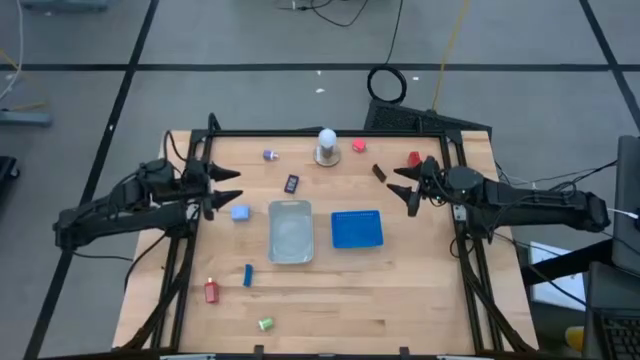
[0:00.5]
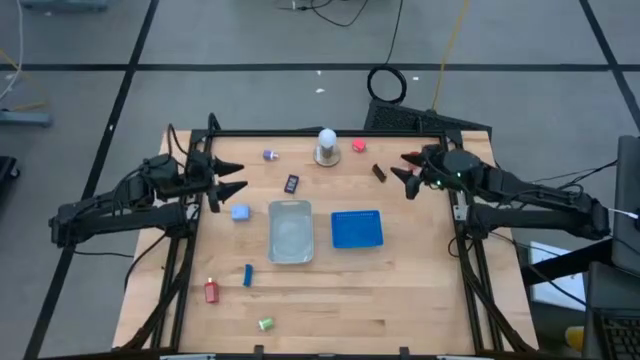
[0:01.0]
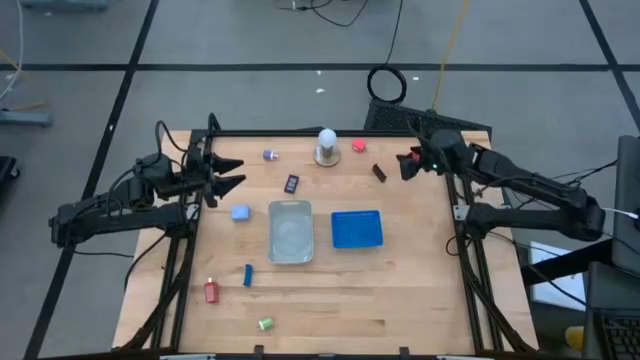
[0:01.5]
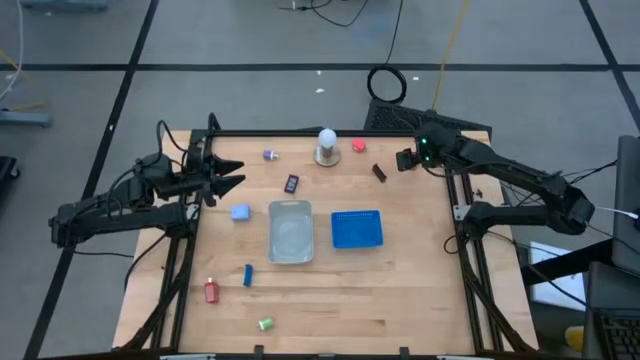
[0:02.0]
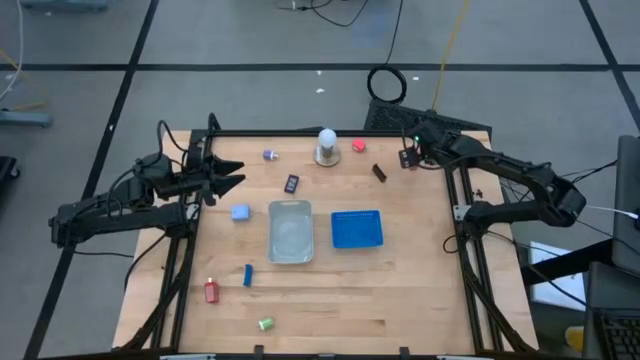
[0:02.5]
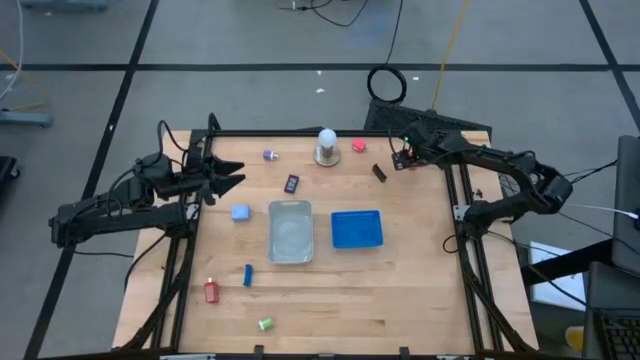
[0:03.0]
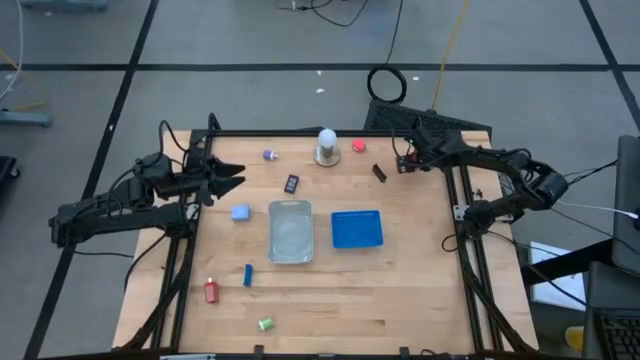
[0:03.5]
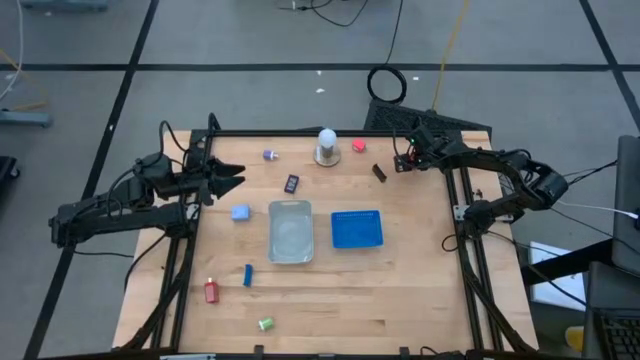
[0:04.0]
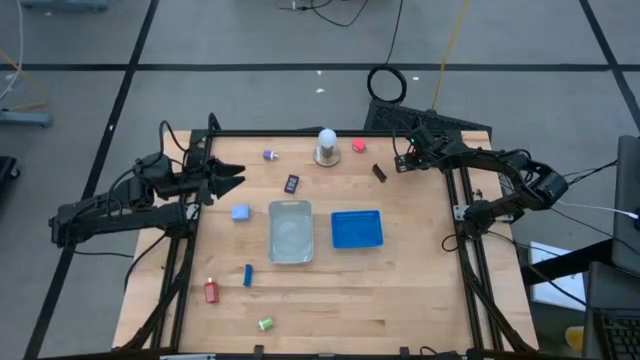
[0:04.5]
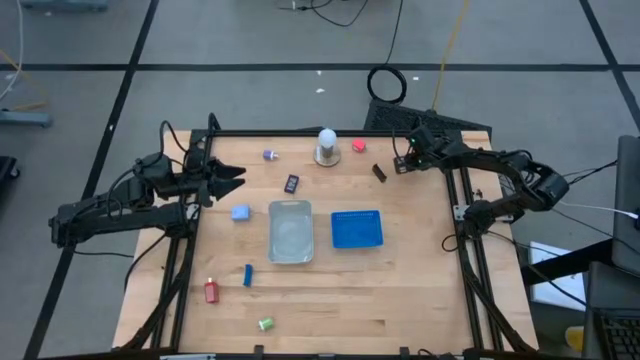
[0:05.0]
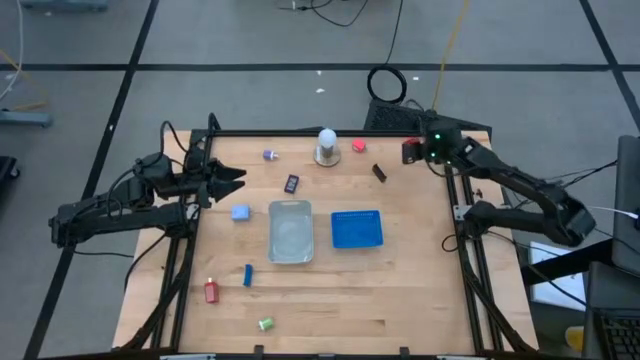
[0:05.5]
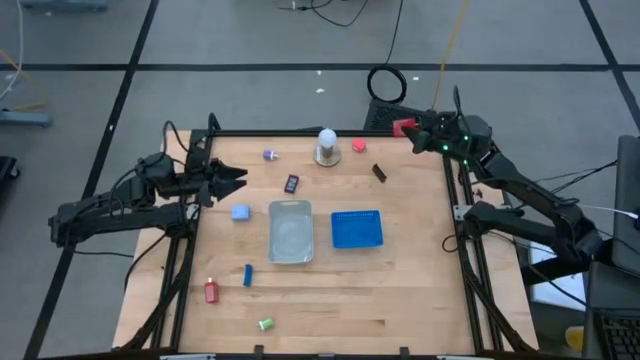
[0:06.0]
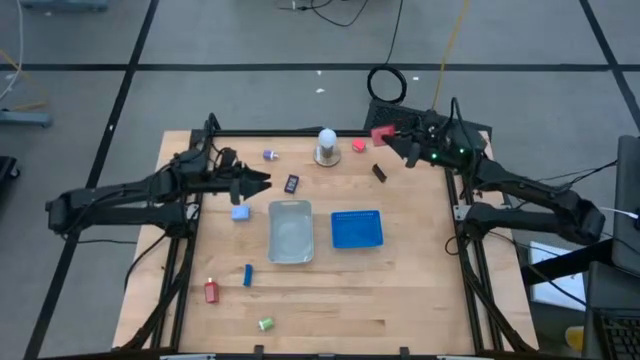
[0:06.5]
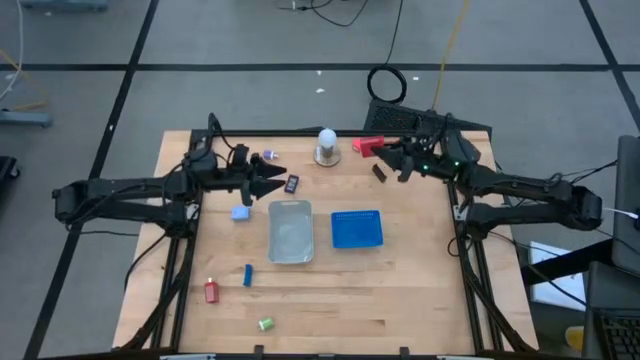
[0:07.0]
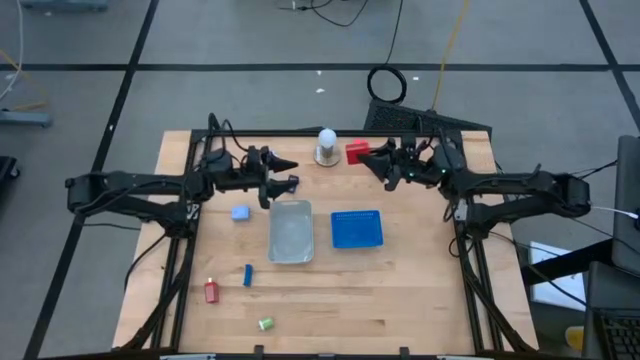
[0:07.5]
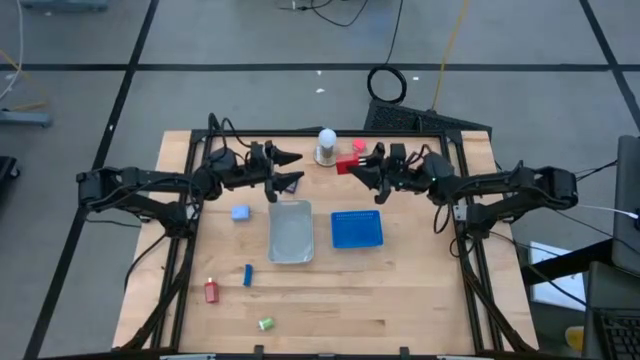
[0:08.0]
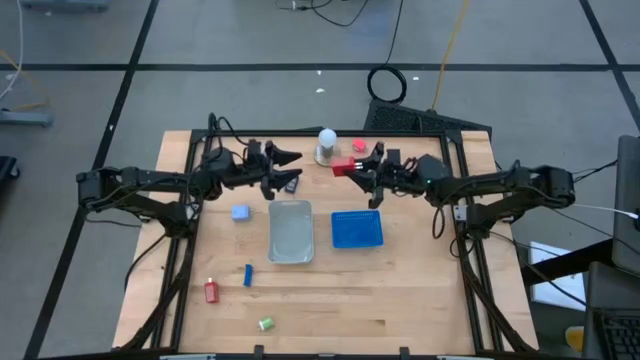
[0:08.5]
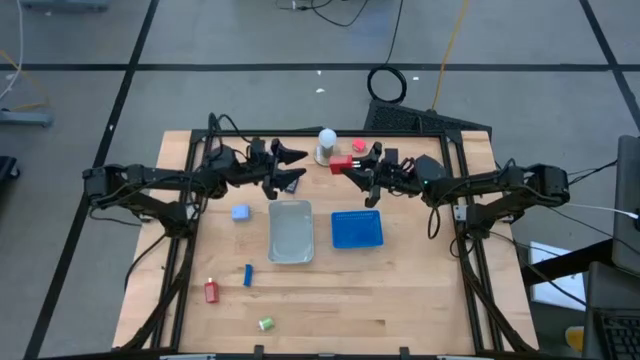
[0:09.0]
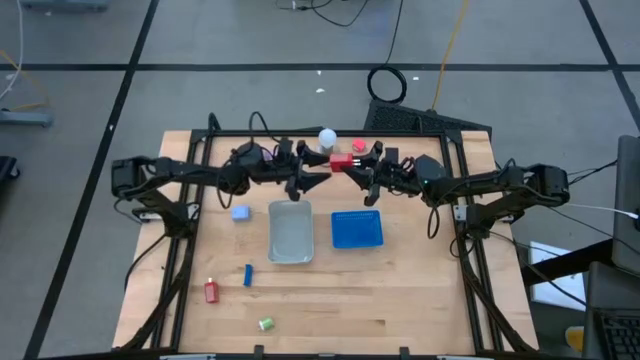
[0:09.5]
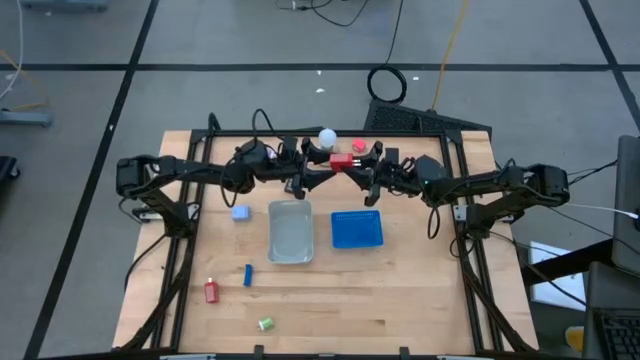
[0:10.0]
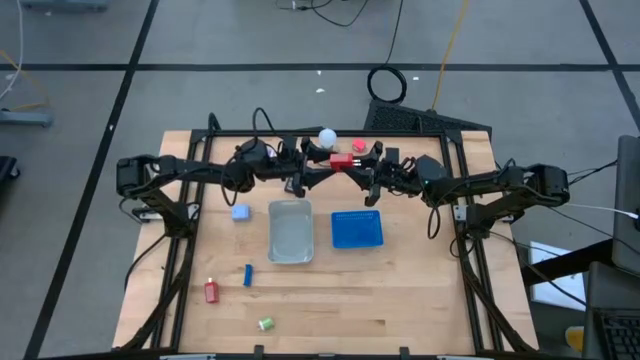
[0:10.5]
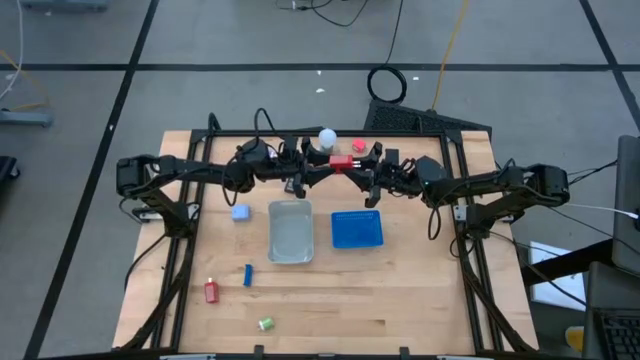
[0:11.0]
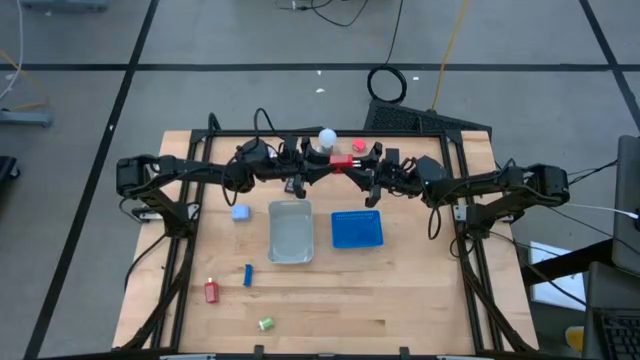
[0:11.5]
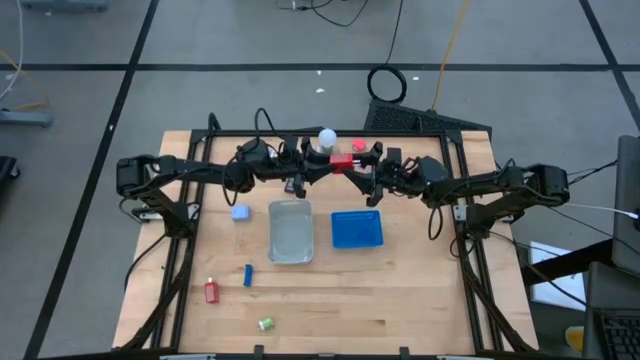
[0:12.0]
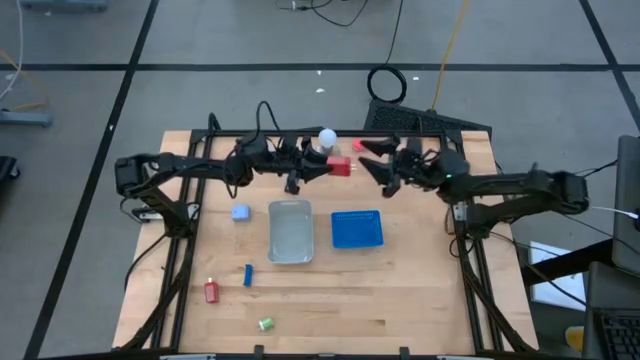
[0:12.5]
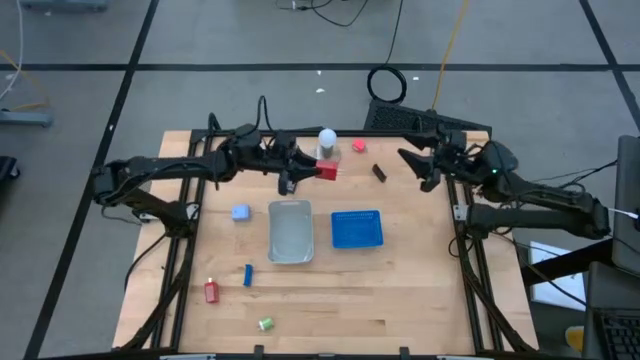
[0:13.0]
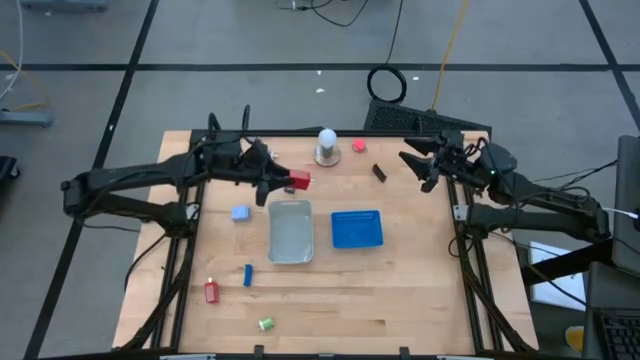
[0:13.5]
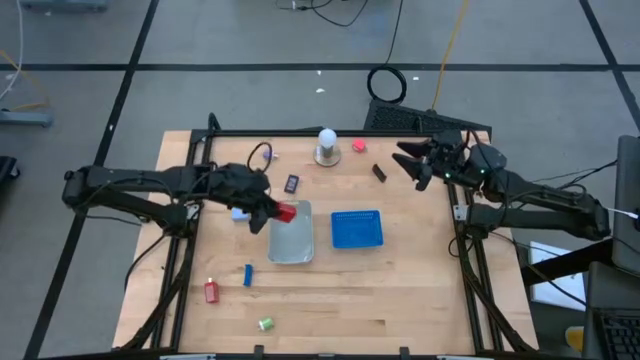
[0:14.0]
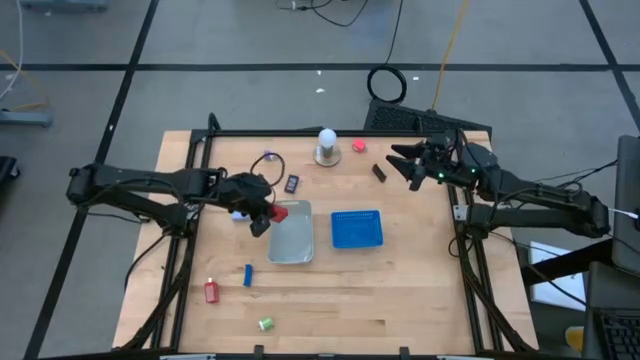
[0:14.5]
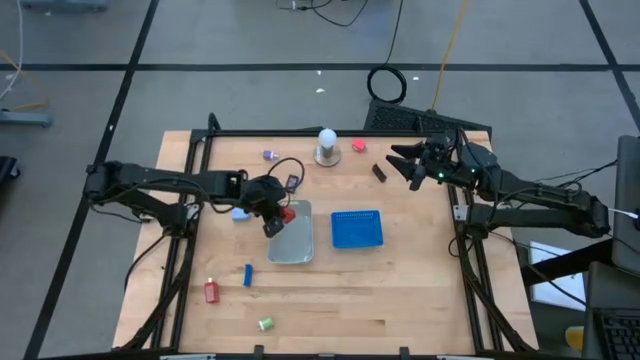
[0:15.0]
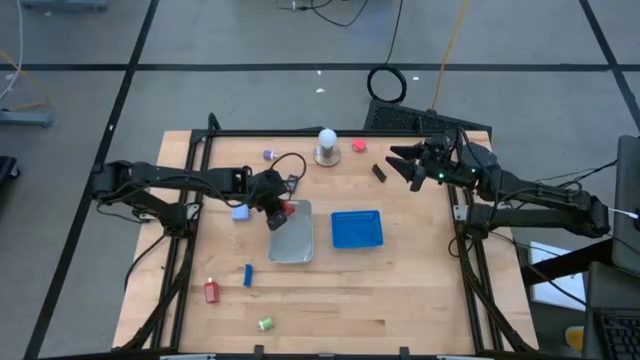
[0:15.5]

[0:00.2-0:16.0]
Task: Pick & Place Office items
Put the top red charger adapter into the gray bin

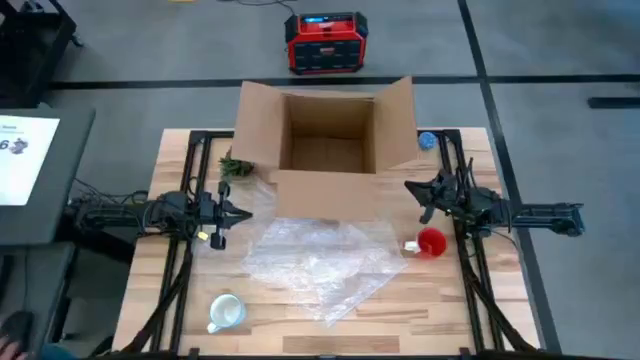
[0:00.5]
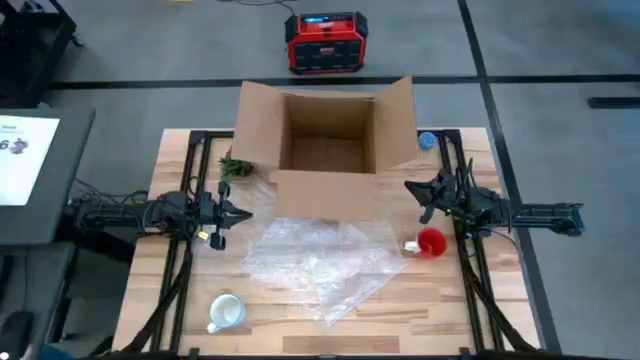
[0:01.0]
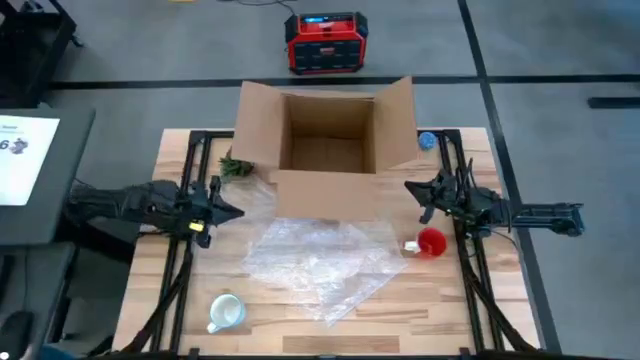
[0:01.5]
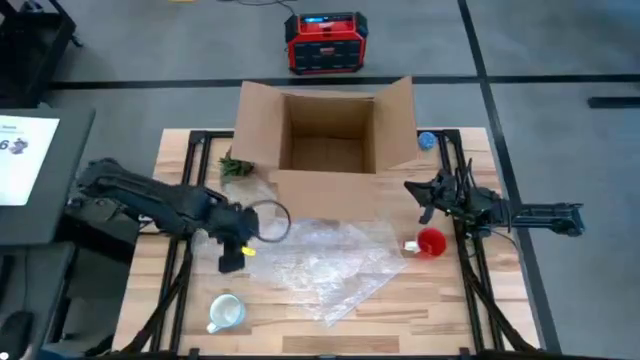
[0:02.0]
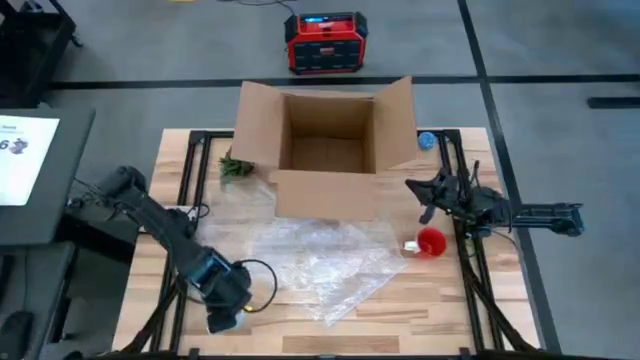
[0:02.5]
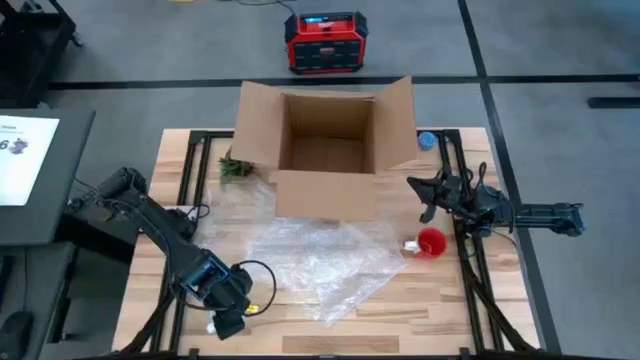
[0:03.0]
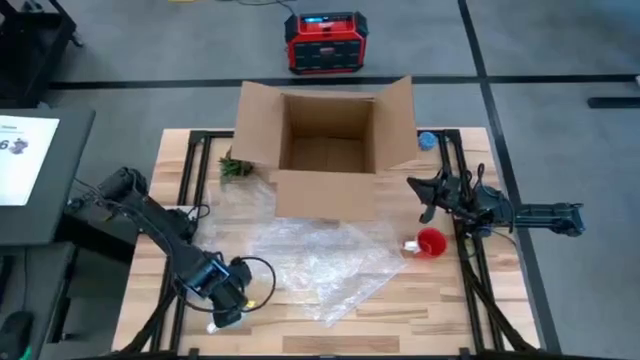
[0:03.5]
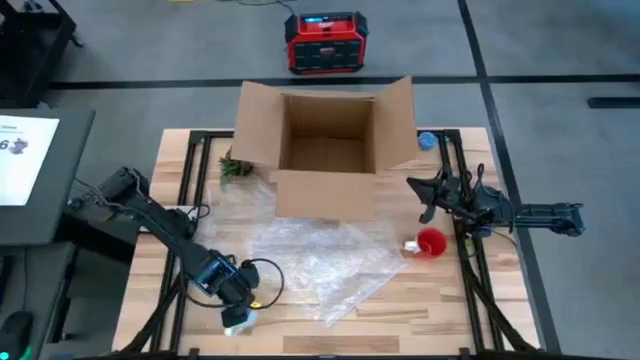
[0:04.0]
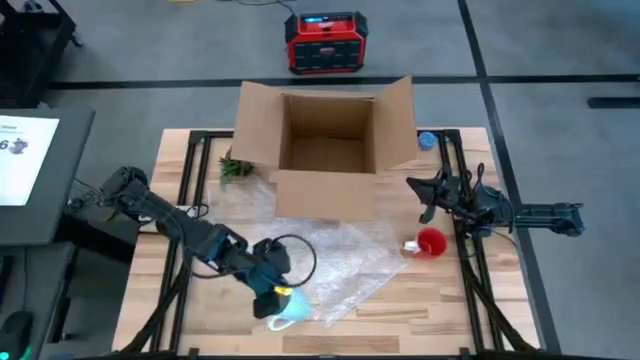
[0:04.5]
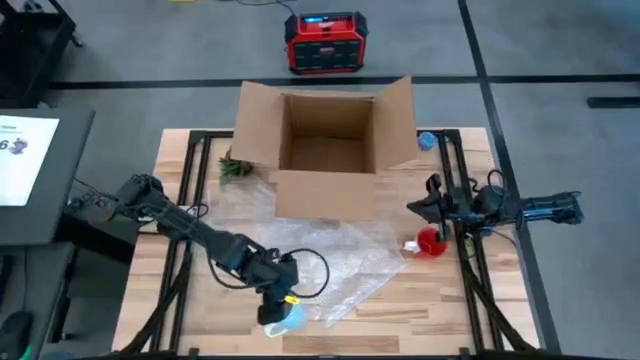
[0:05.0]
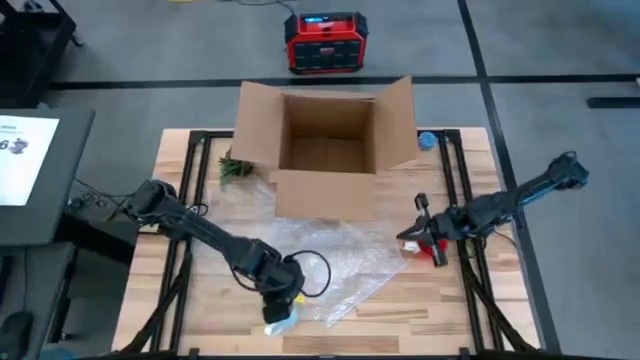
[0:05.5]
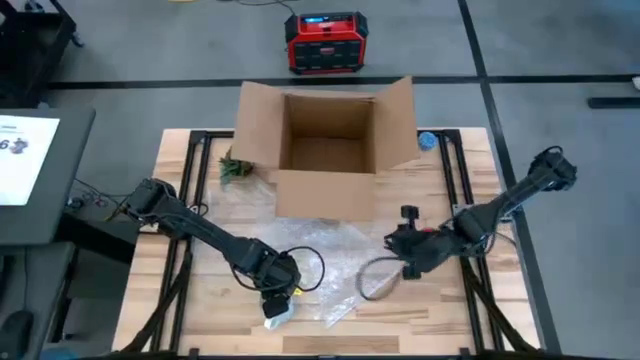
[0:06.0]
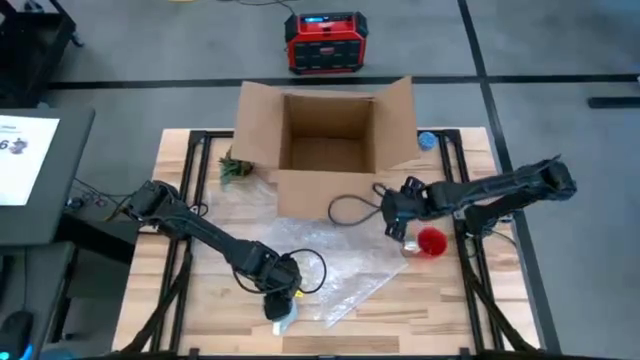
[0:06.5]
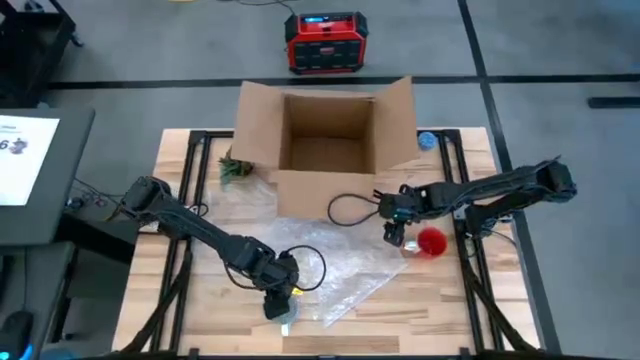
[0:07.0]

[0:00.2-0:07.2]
Task: wrap mug
Prepare the blue patterned mug

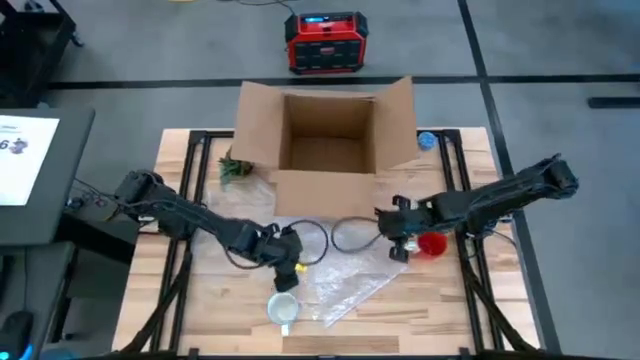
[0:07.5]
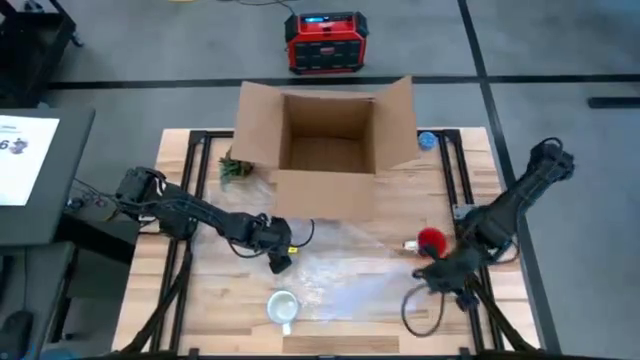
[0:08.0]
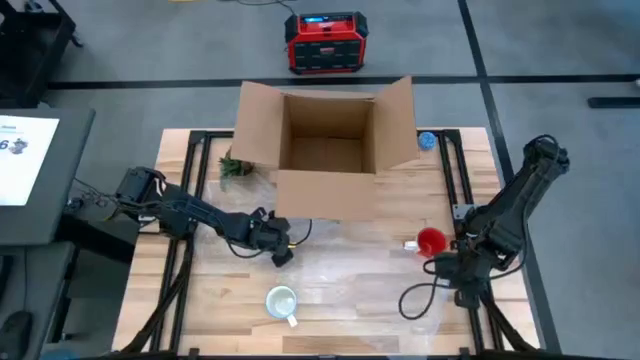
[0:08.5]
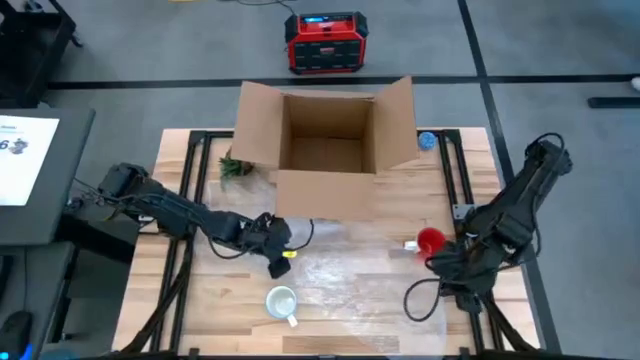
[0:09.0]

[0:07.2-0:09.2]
Prepare the transparent bubble wrap
